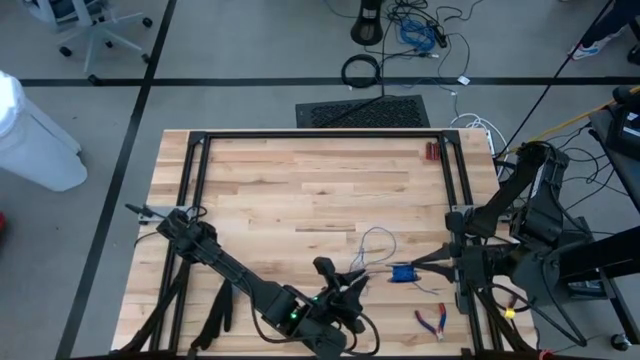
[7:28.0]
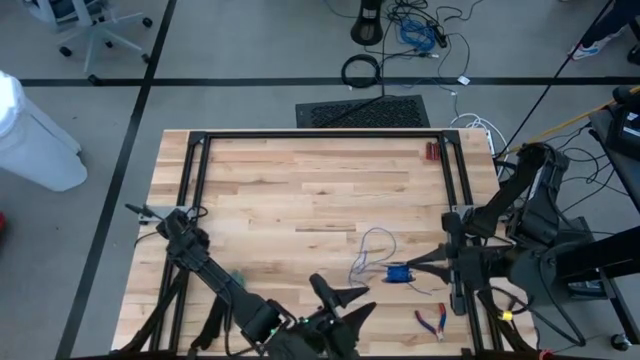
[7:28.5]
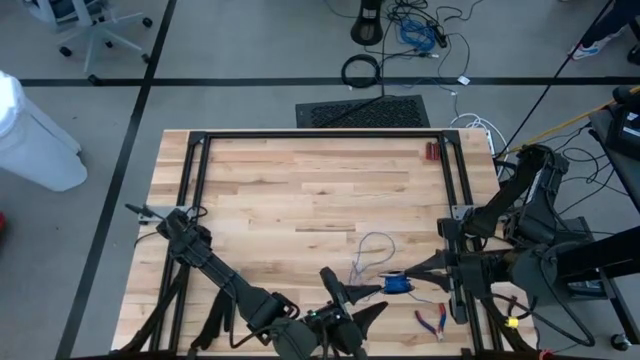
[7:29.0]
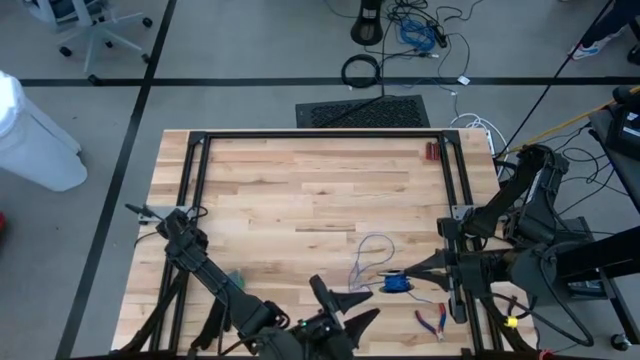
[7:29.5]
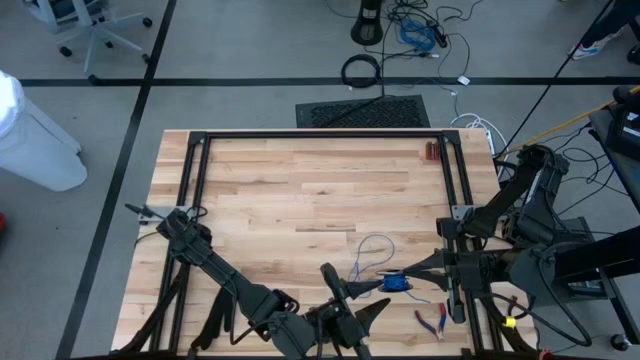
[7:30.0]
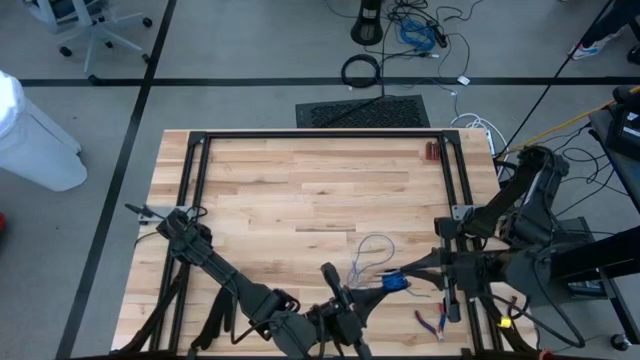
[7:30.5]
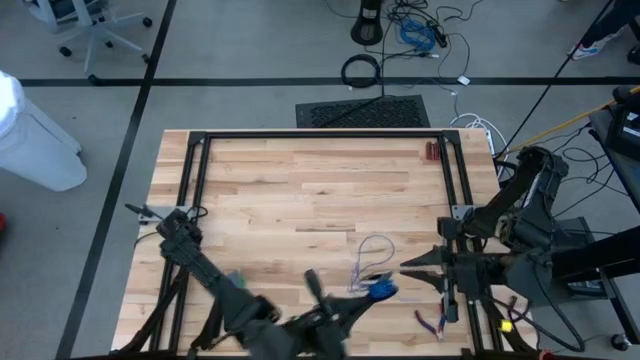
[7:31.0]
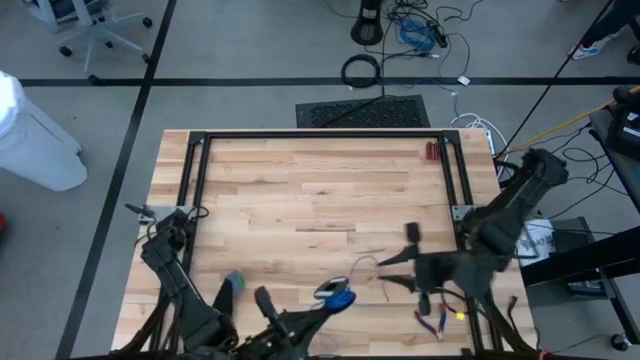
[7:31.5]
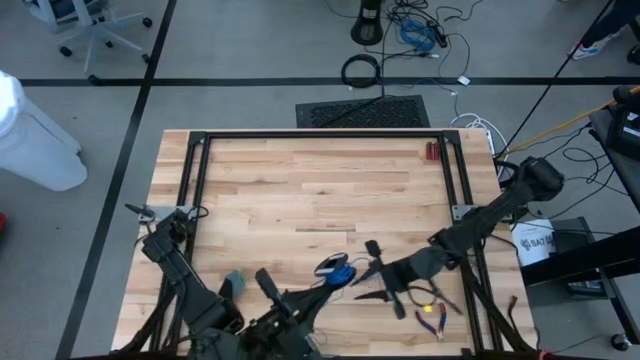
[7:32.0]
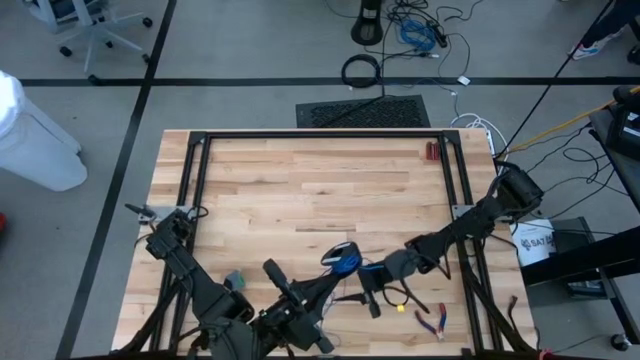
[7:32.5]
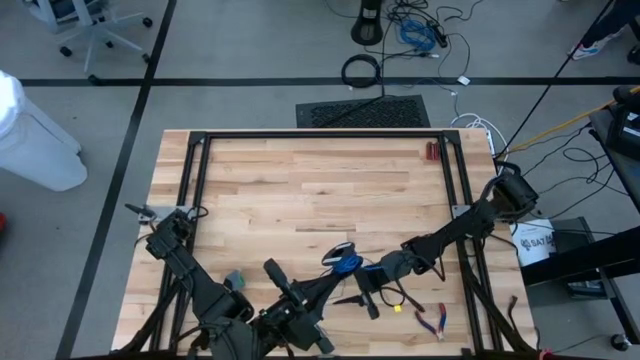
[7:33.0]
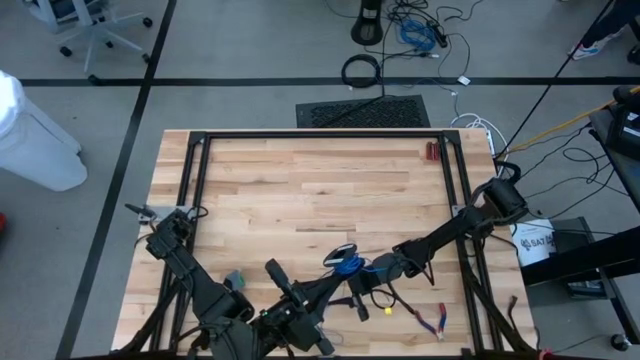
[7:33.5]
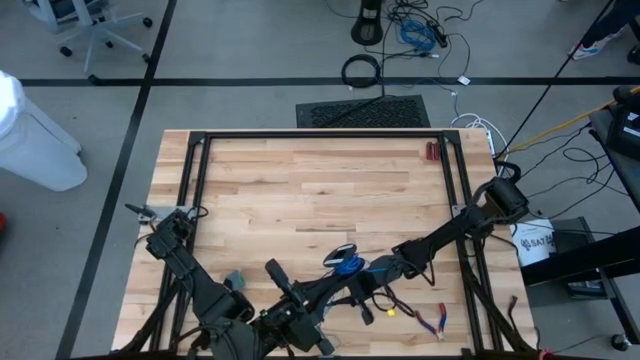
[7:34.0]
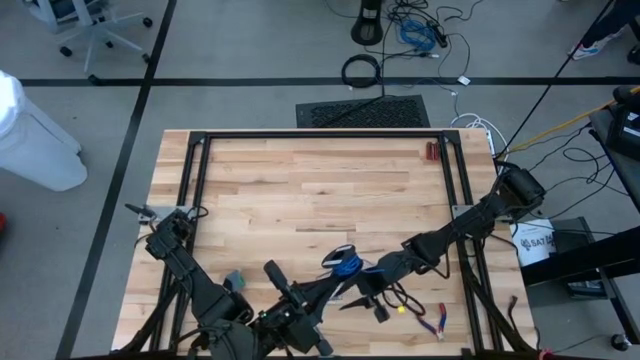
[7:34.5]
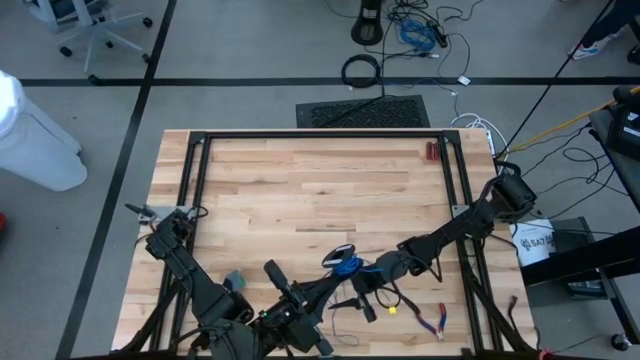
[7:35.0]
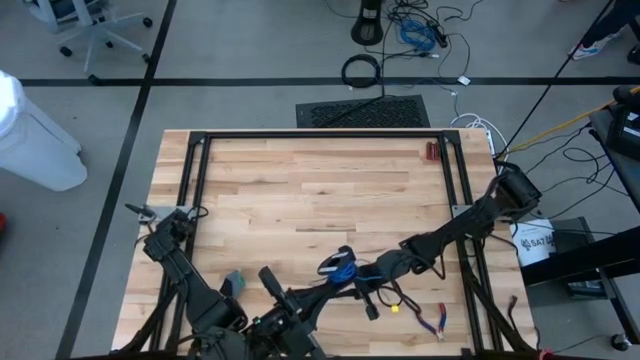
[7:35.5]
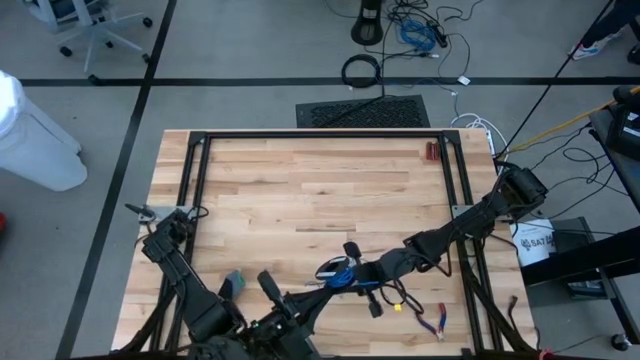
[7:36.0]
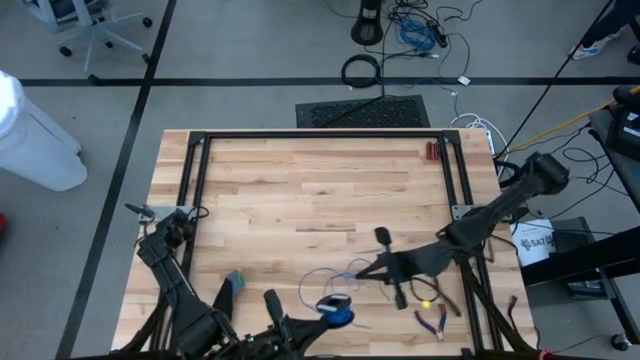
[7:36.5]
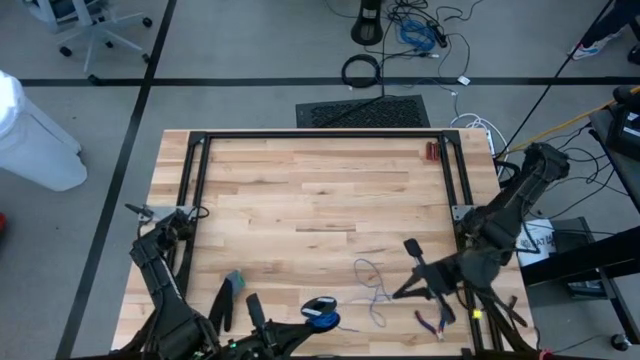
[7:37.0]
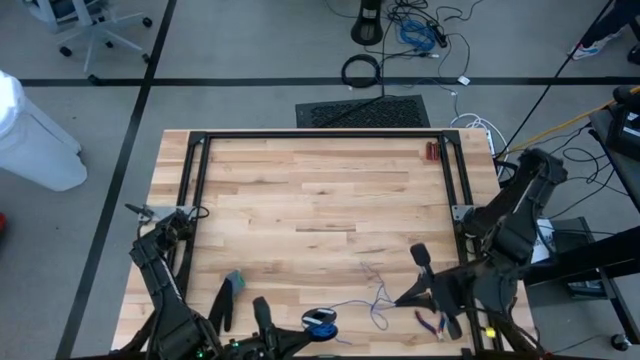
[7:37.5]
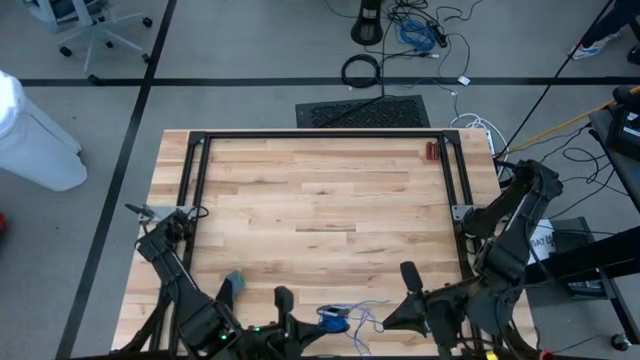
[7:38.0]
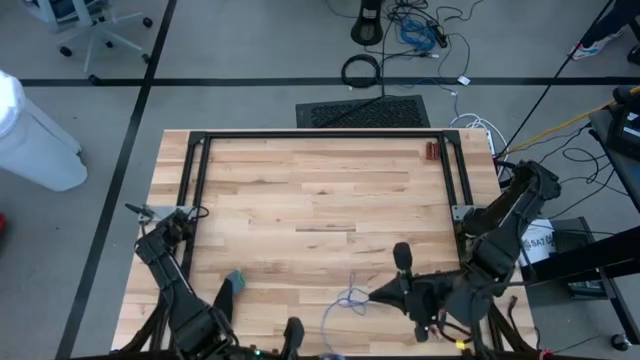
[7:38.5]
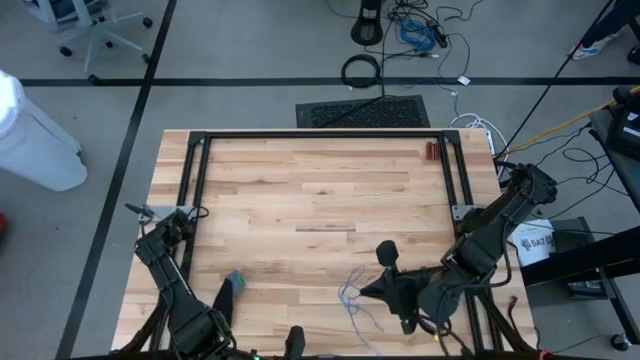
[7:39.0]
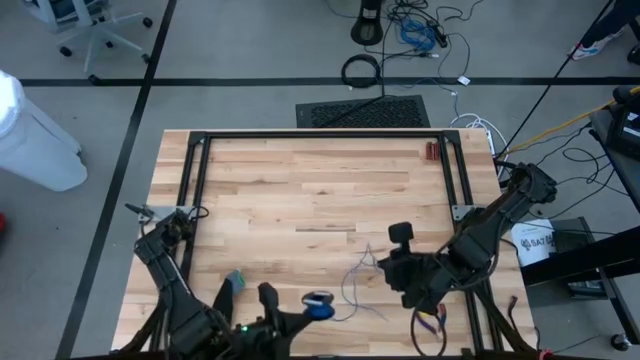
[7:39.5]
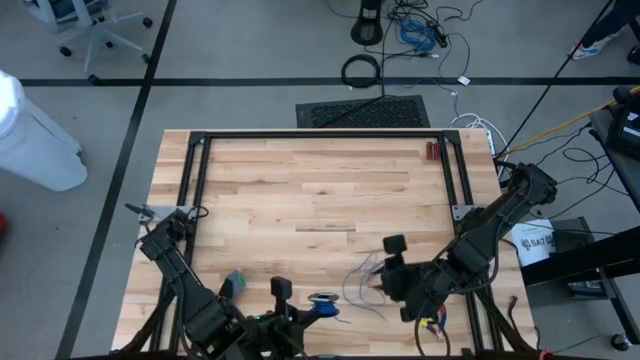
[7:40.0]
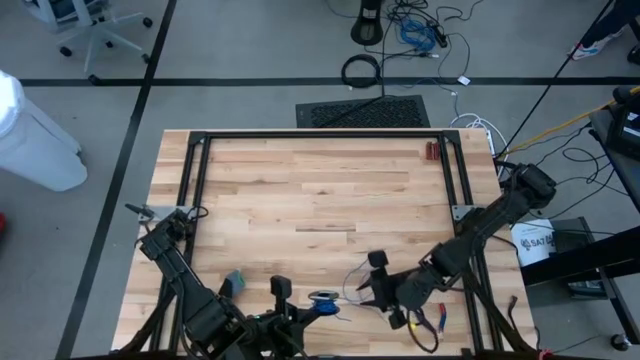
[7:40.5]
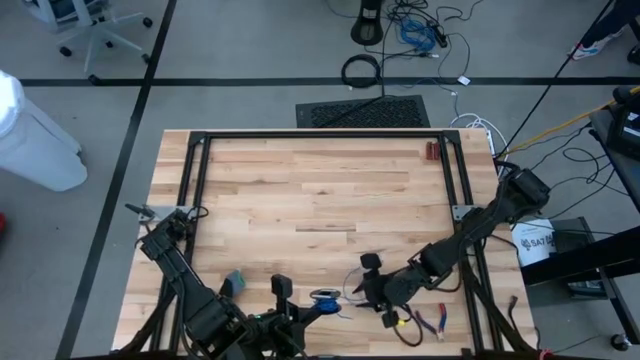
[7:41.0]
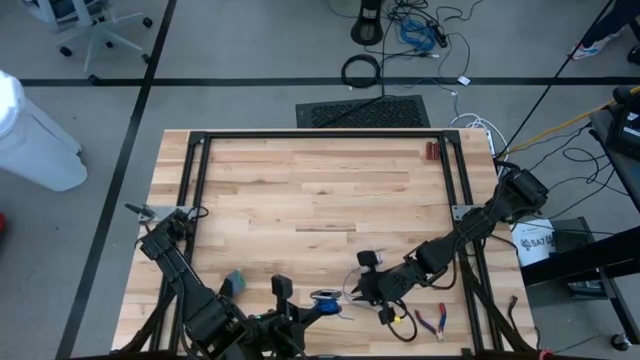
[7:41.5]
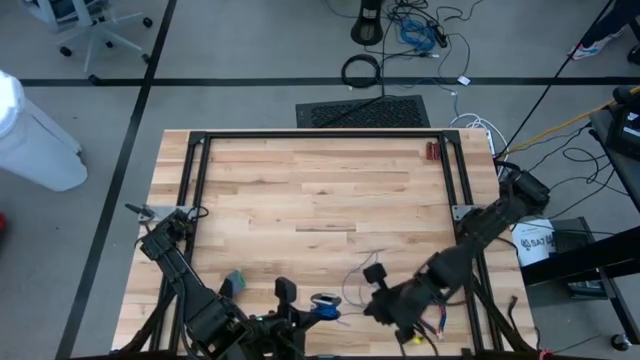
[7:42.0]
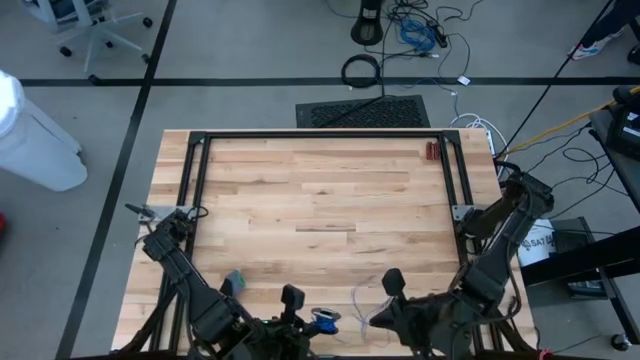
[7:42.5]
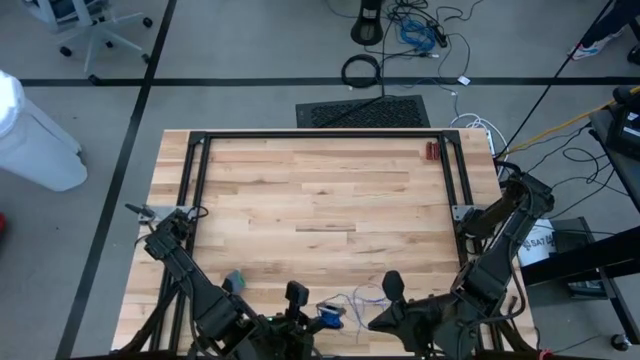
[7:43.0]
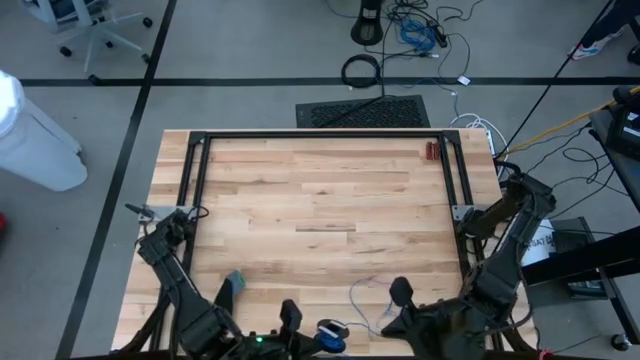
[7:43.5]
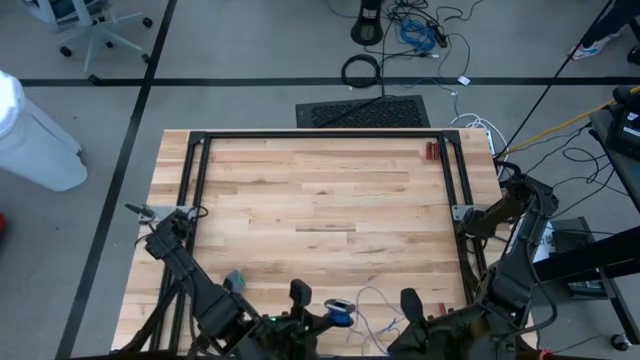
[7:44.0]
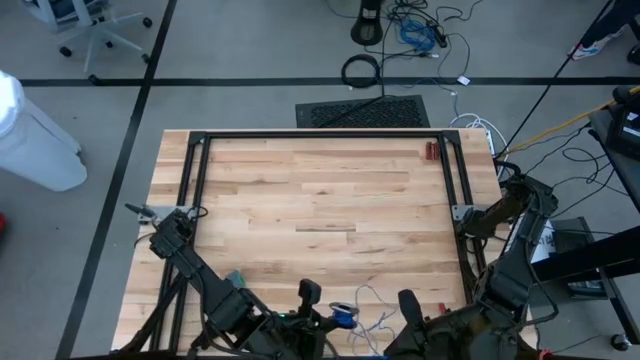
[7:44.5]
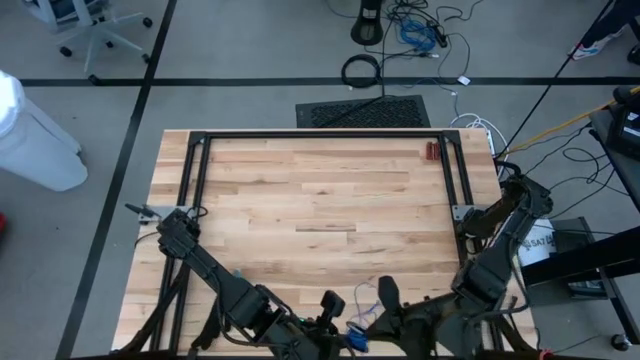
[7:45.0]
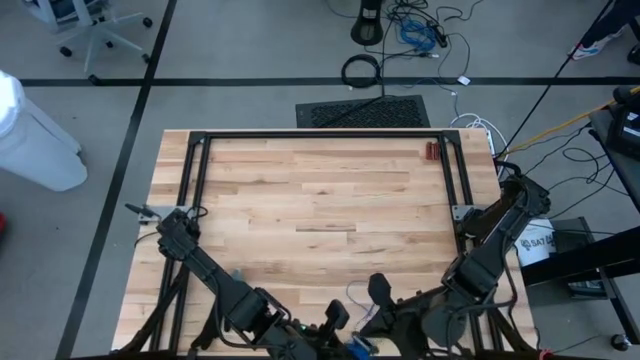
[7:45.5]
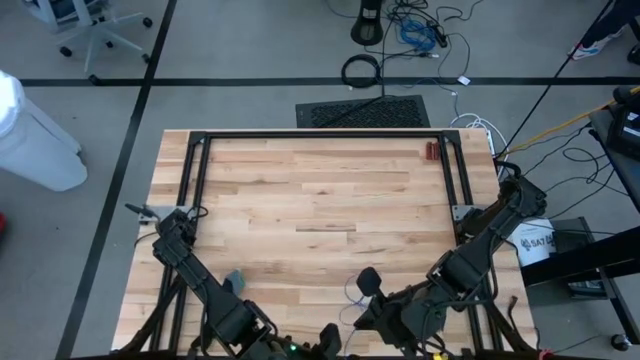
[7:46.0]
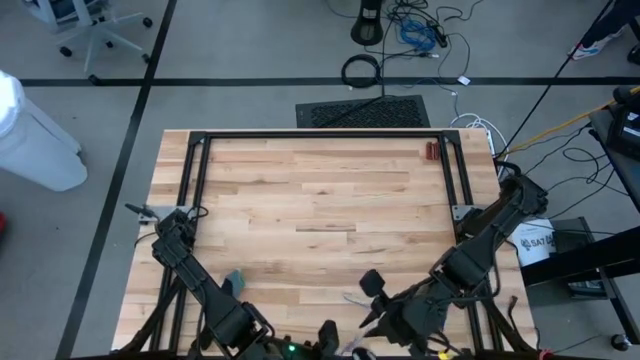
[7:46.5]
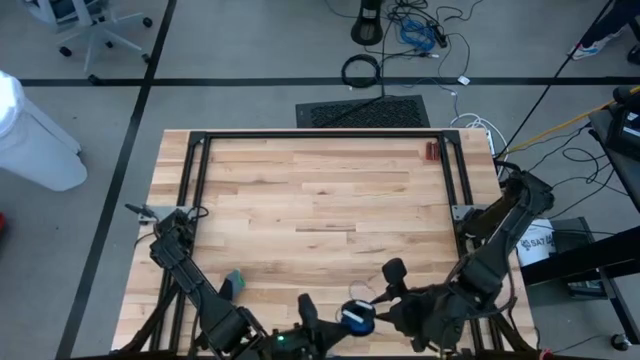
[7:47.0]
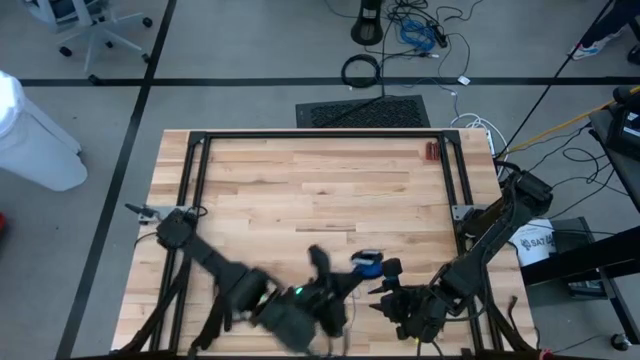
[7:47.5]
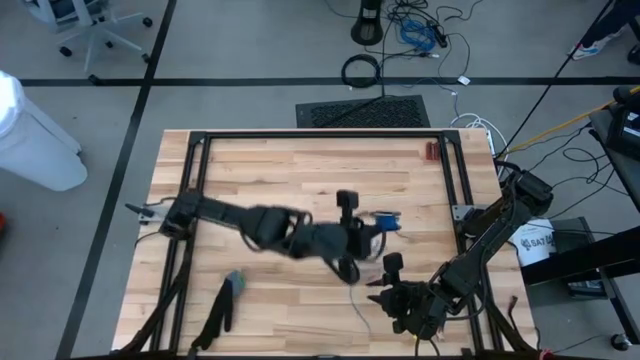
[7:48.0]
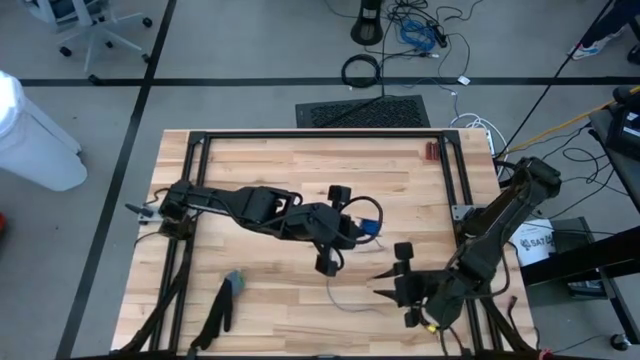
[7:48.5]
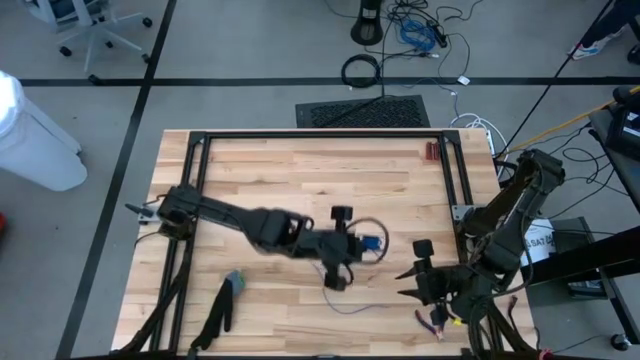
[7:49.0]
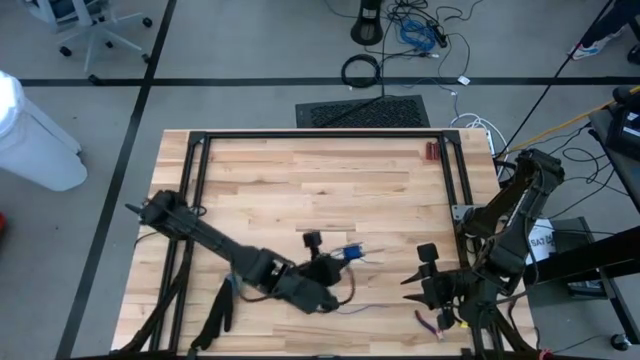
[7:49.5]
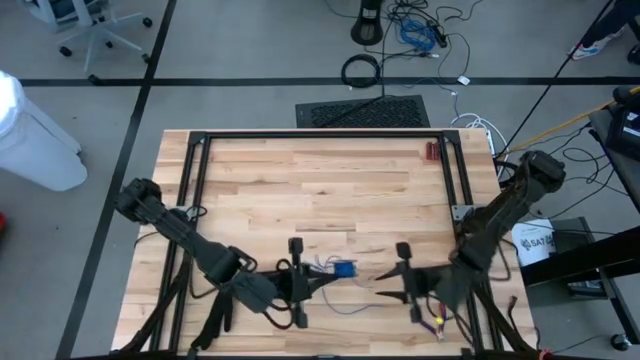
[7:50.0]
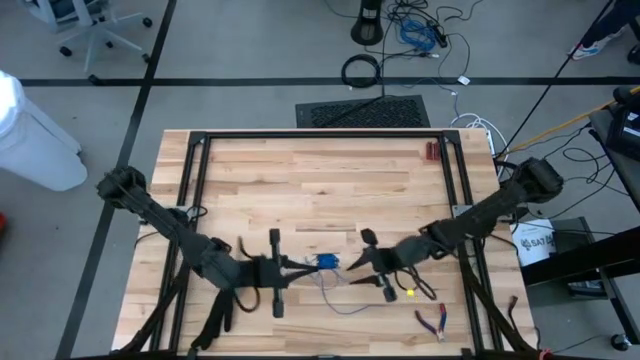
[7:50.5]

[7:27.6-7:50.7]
Task: Coil cords
Coil the blue wire onto the black spool
